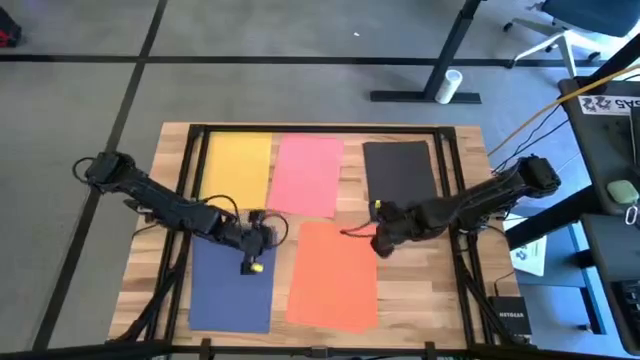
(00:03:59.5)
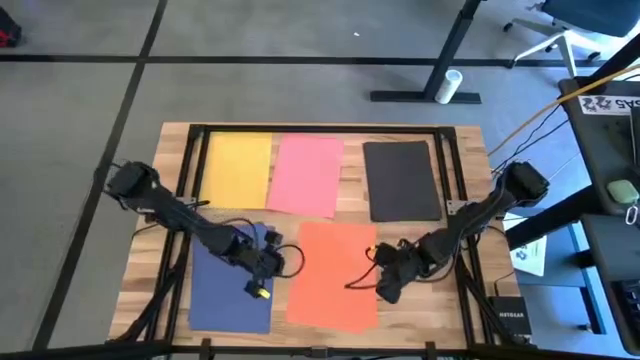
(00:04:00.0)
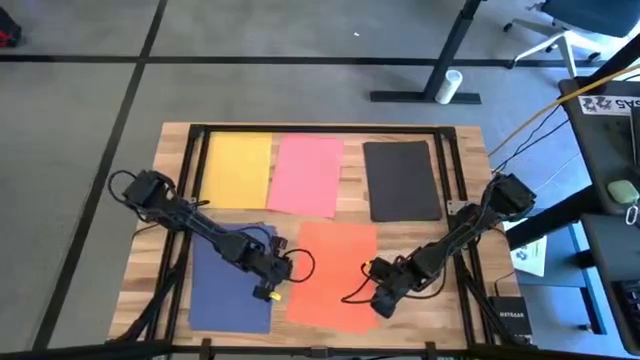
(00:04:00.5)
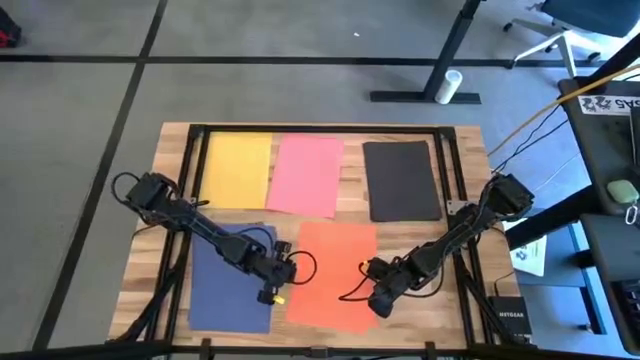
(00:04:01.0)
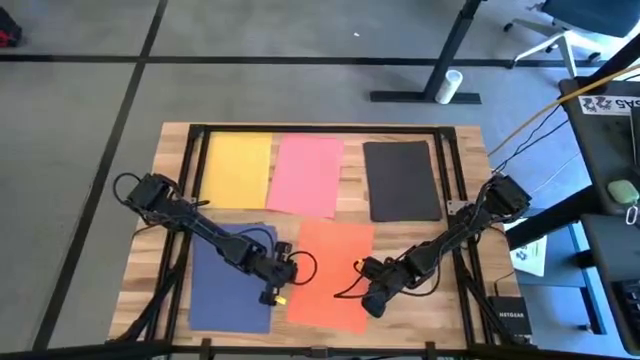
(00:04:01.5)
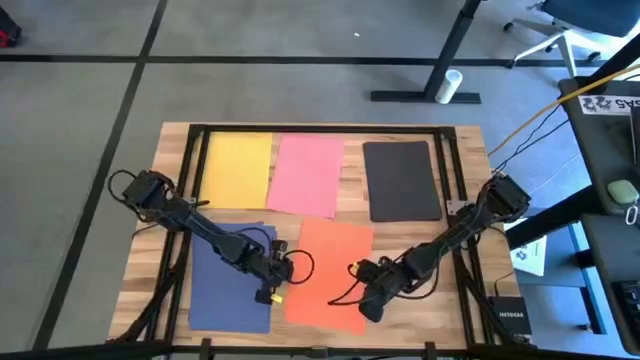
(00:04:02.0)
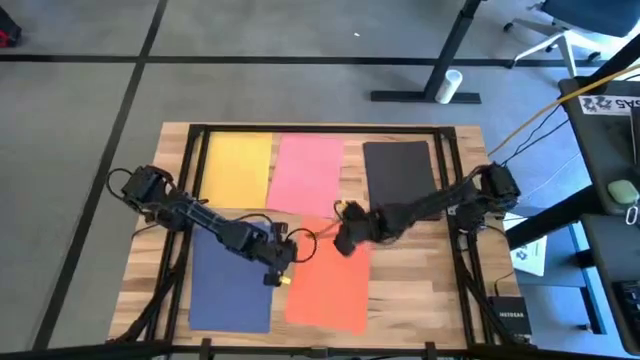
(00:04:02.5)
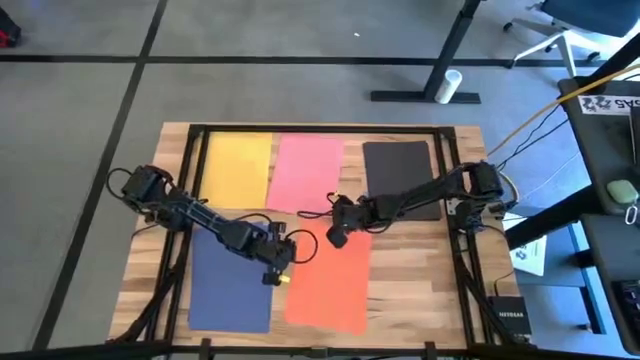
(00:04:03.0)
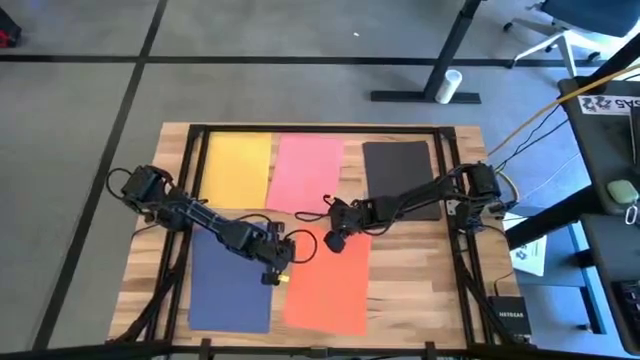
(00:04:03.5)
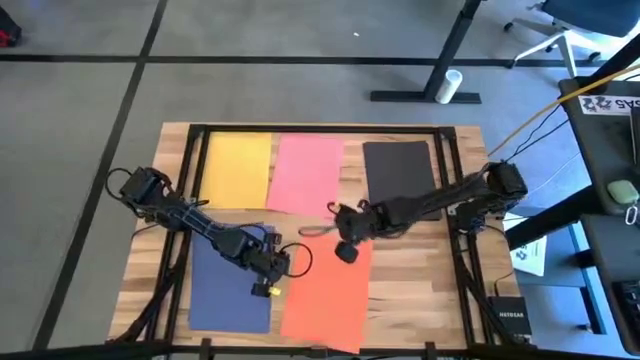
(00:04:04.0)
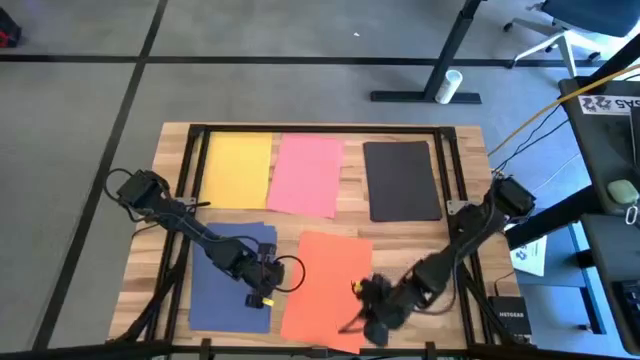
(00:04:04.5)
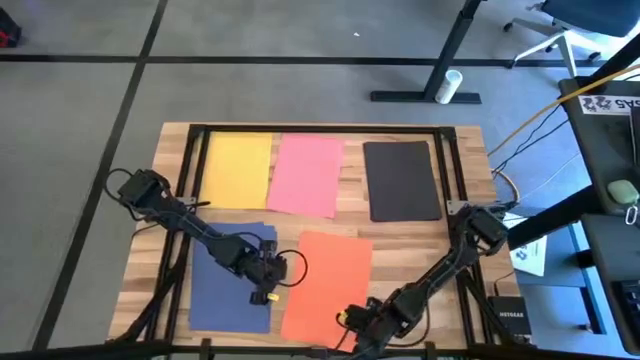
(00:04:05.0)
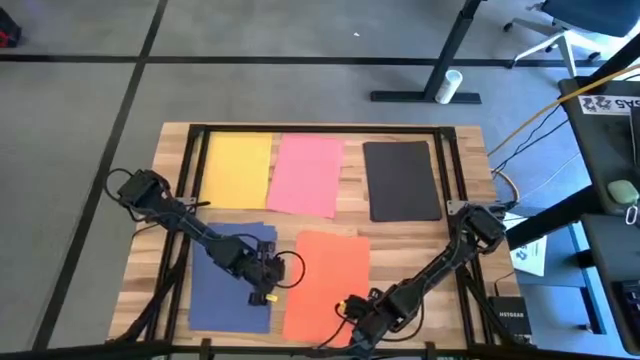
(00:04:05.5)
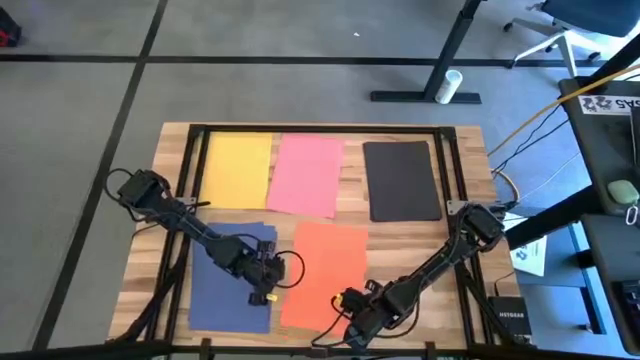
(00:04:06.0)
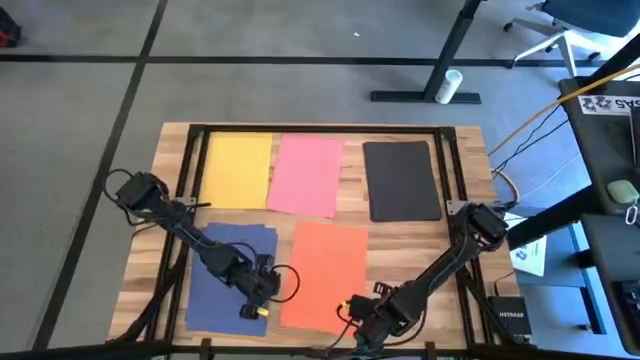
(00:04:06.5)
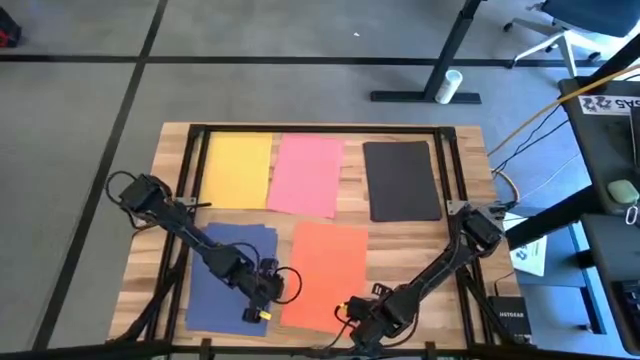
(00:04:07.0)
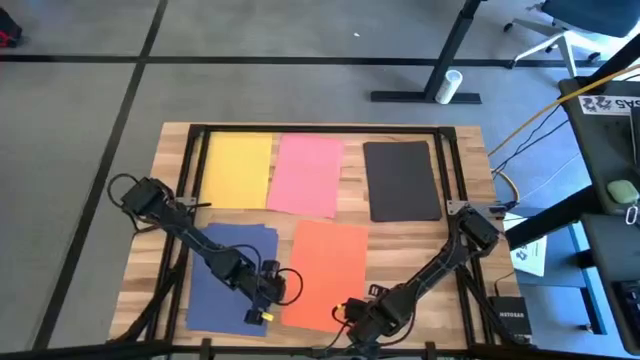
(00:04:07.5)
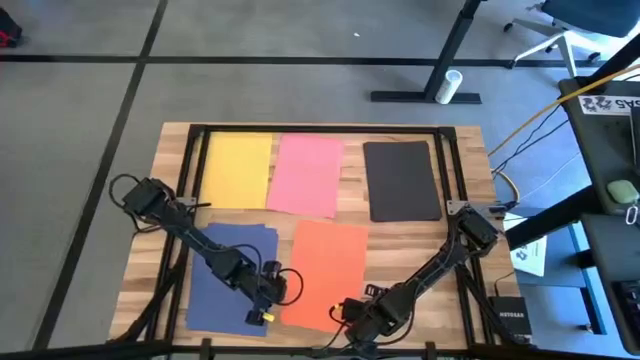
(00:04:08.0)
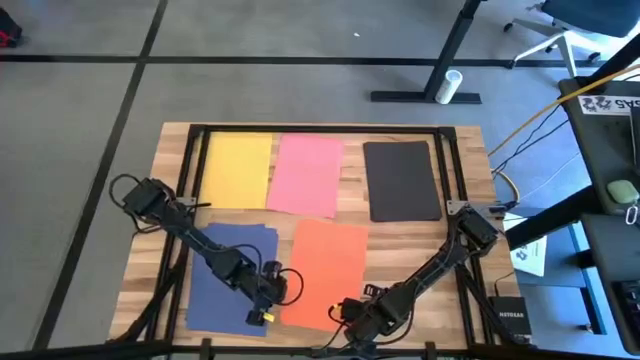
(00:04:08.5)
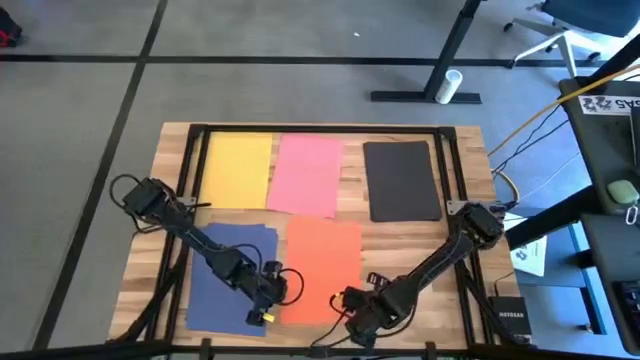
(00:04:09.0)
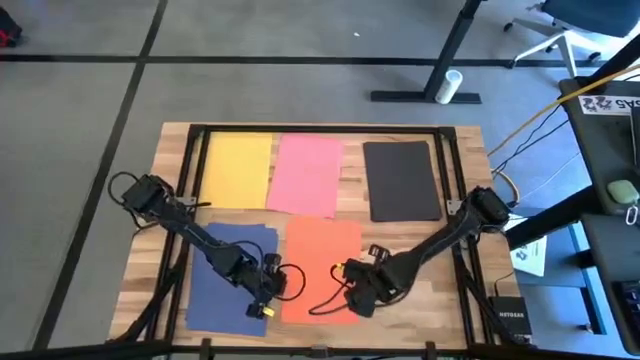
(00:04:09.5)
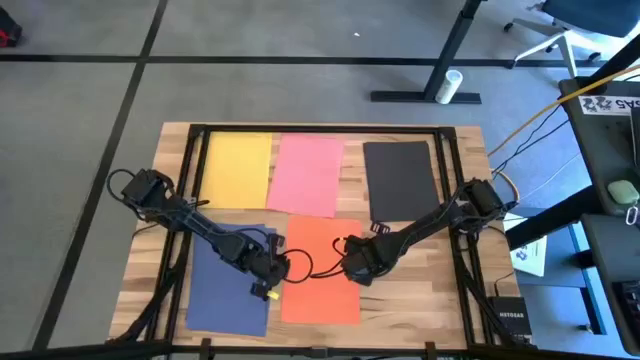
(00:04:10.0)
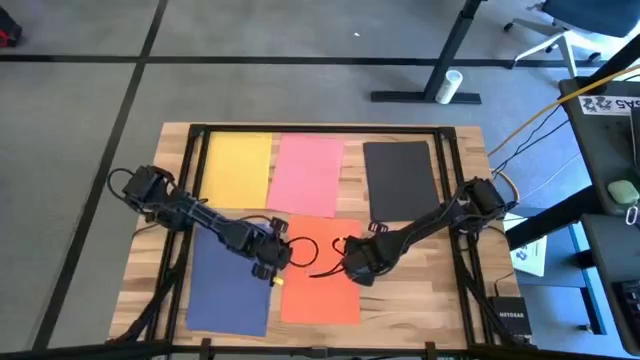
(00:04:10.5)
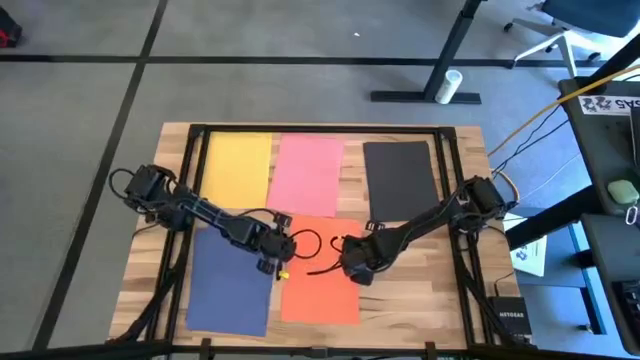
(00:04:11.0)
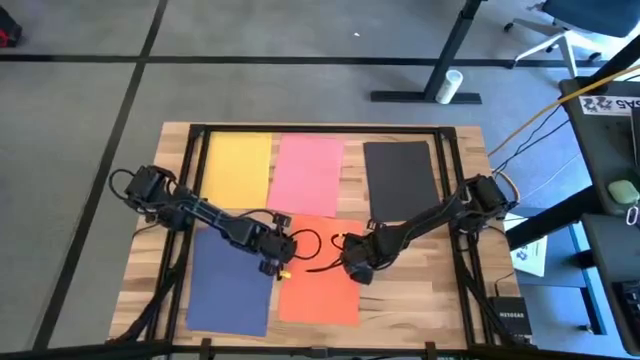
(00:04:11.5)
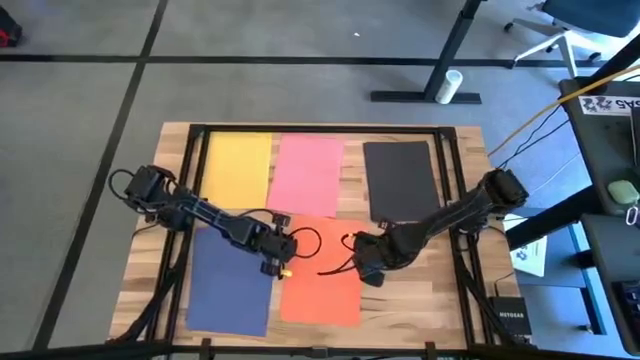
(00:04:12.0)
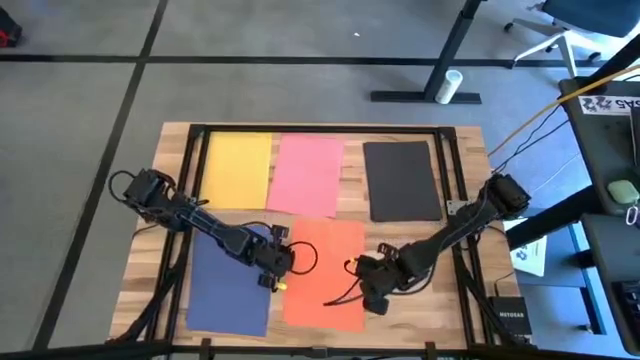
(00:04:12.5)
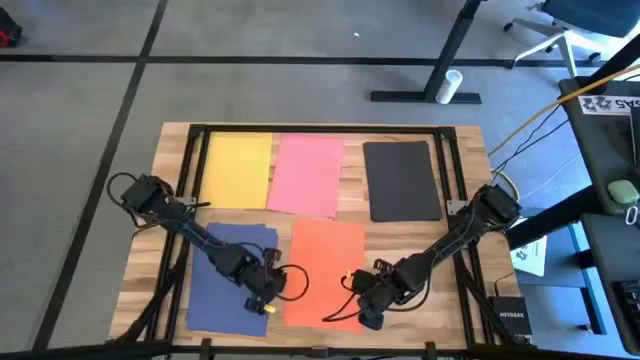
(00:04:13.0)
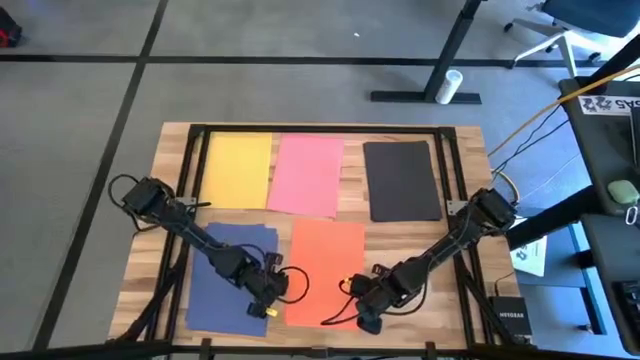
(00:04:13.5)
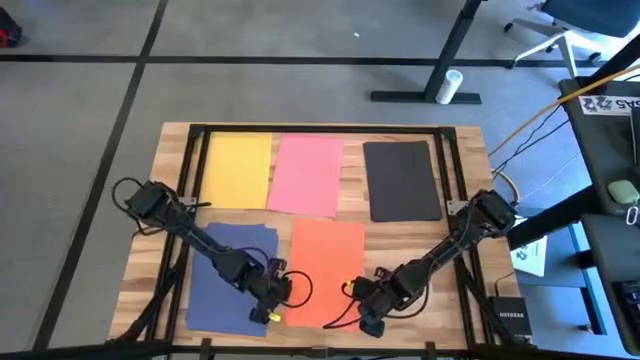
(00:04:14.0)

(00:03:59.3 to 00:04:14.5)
Task: Organize paper
Adjust the stacked orange papers
